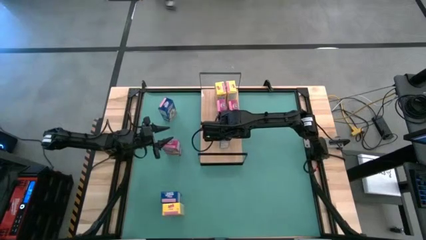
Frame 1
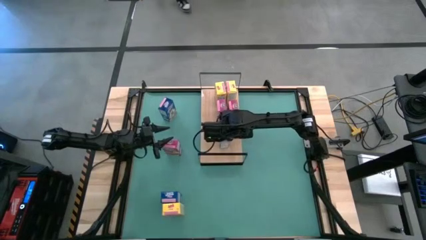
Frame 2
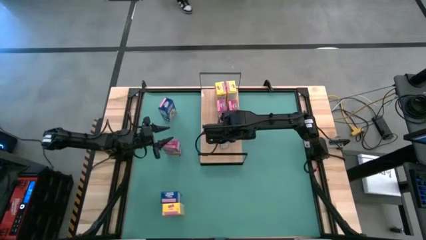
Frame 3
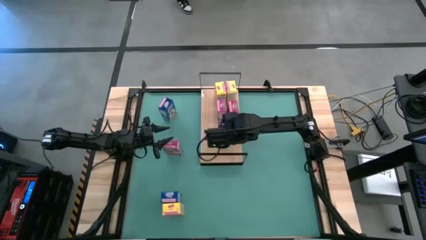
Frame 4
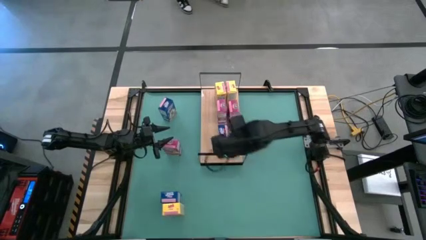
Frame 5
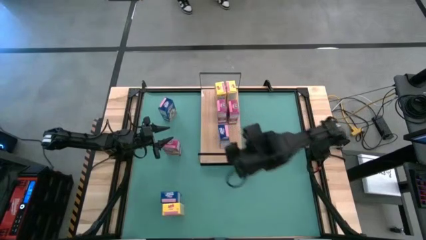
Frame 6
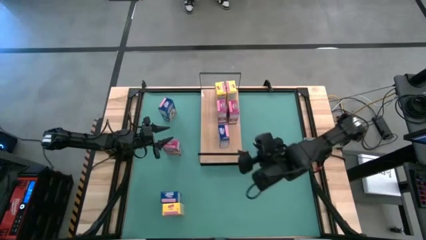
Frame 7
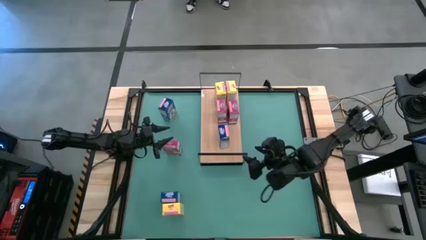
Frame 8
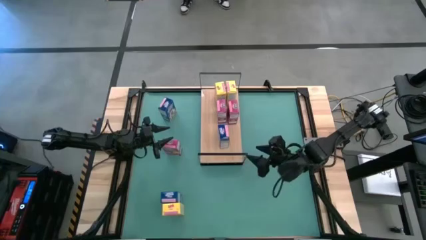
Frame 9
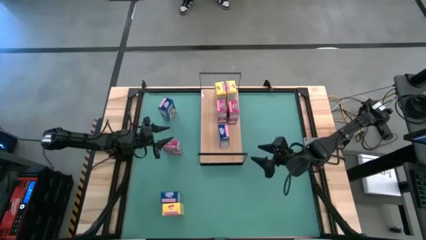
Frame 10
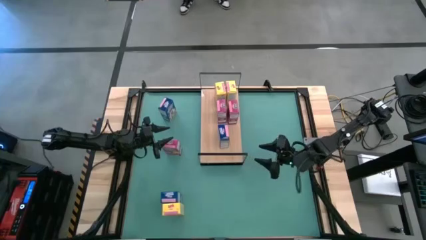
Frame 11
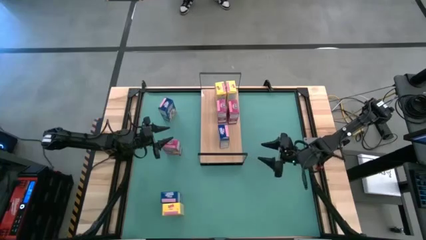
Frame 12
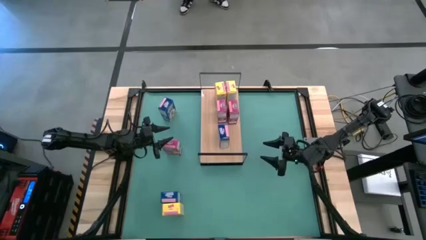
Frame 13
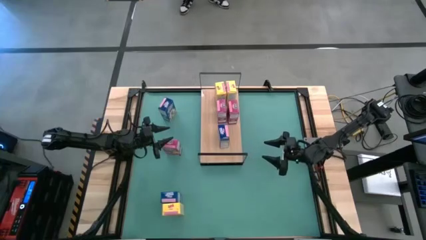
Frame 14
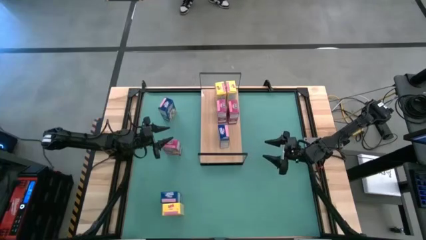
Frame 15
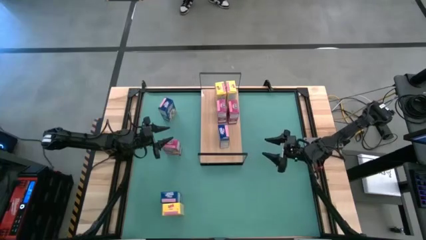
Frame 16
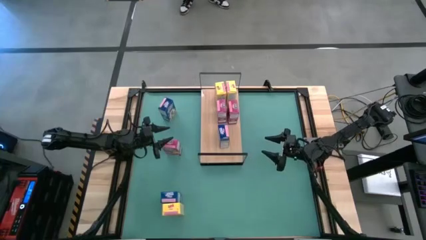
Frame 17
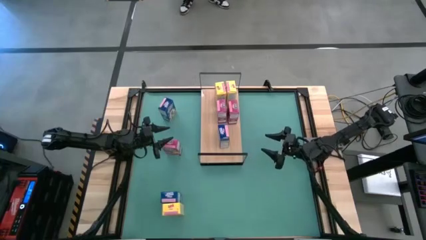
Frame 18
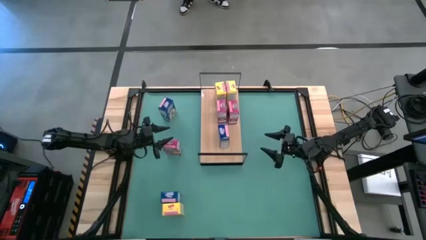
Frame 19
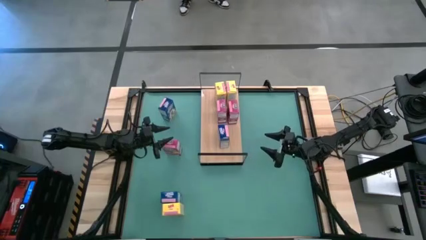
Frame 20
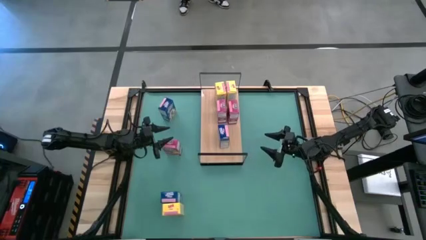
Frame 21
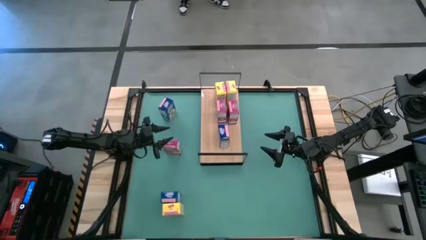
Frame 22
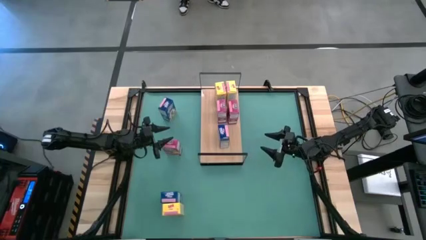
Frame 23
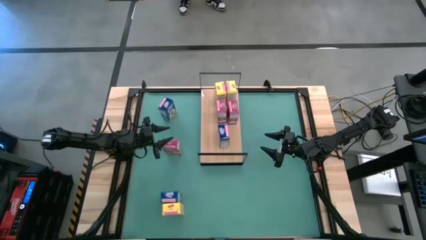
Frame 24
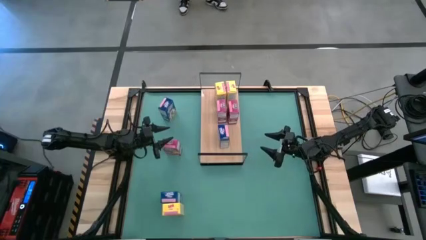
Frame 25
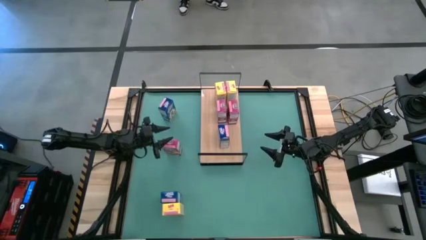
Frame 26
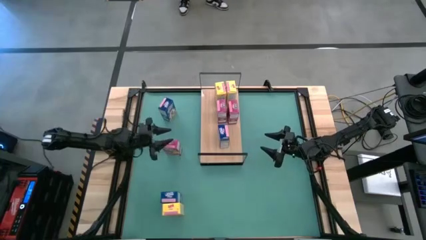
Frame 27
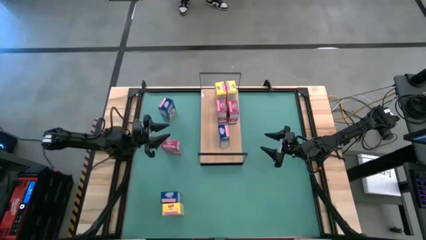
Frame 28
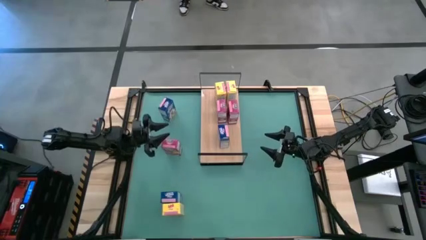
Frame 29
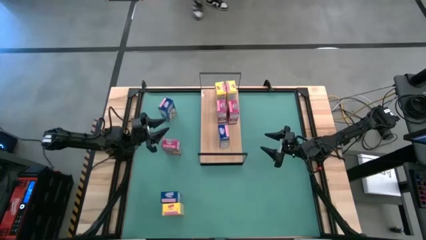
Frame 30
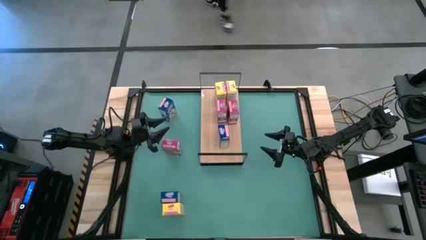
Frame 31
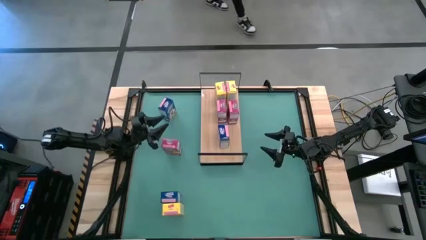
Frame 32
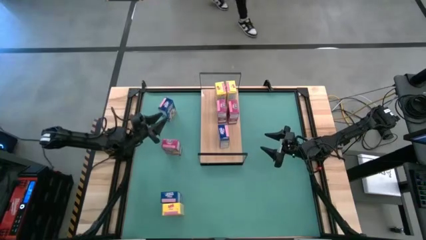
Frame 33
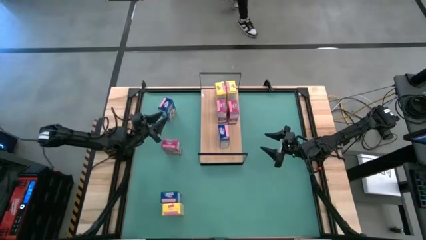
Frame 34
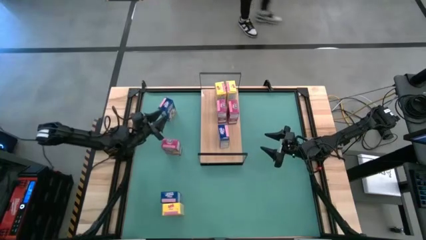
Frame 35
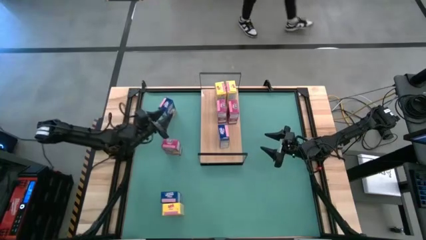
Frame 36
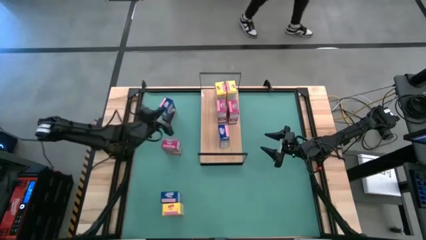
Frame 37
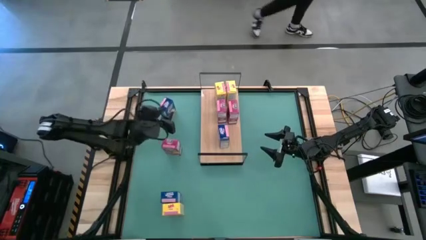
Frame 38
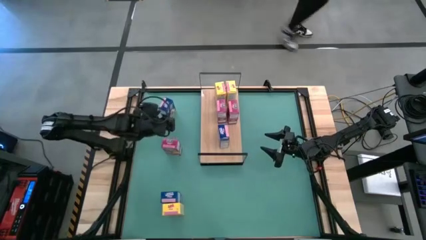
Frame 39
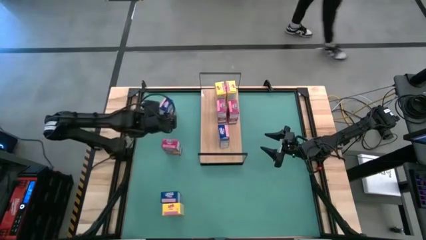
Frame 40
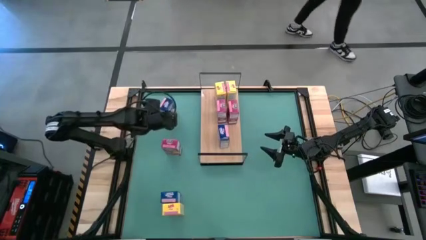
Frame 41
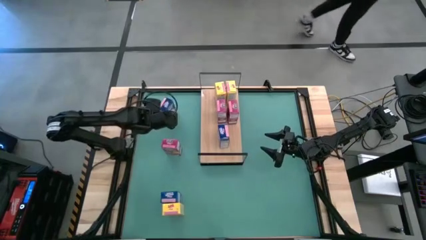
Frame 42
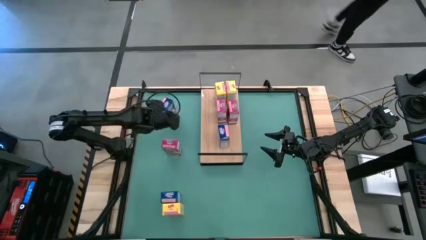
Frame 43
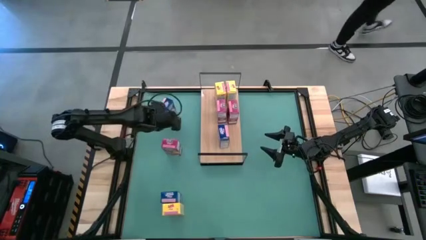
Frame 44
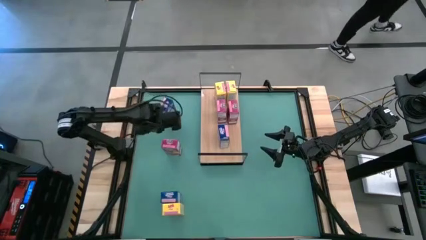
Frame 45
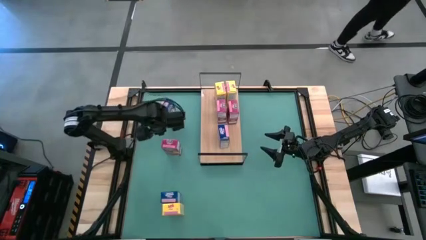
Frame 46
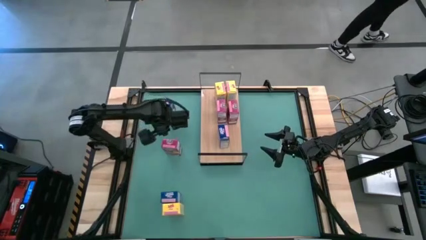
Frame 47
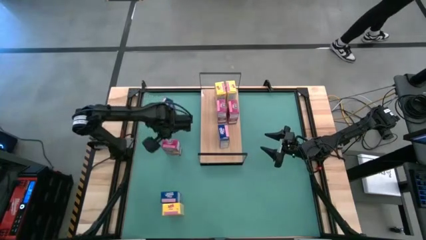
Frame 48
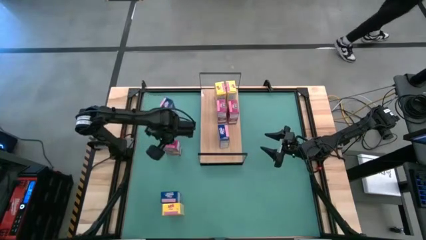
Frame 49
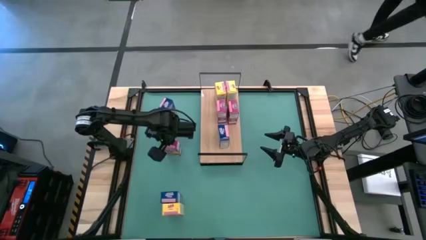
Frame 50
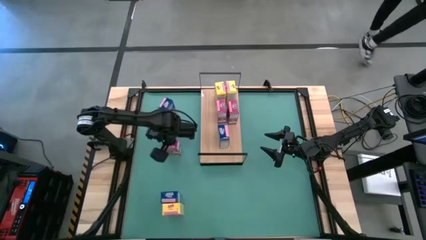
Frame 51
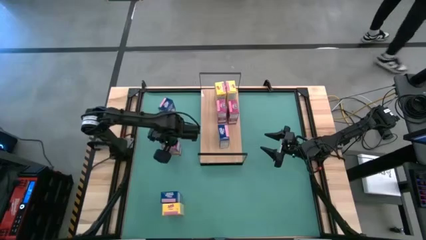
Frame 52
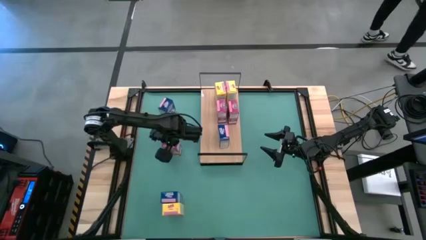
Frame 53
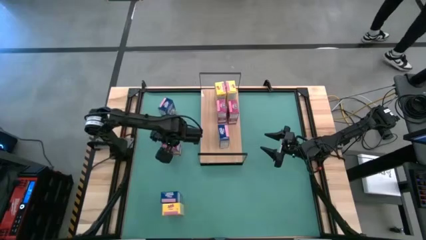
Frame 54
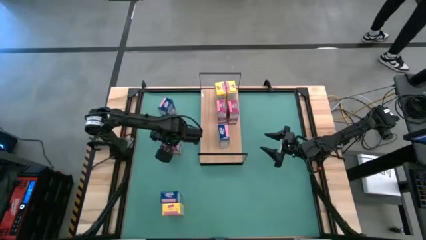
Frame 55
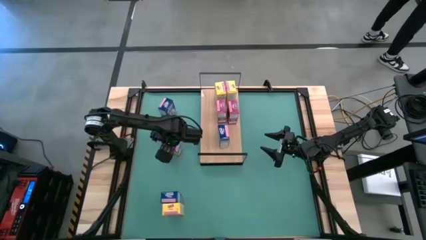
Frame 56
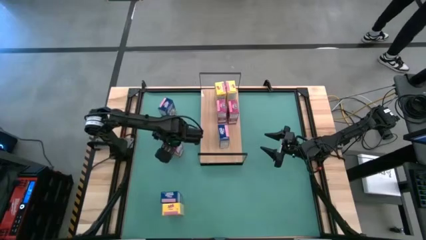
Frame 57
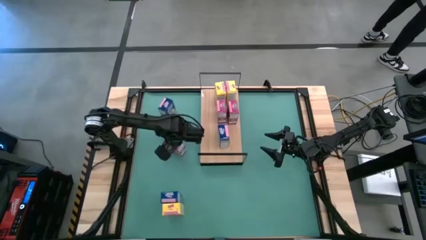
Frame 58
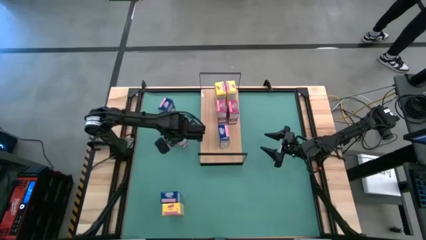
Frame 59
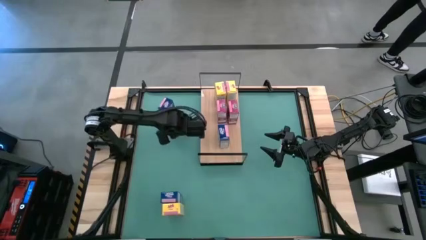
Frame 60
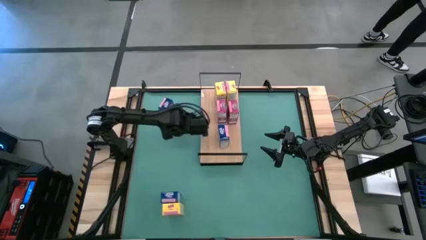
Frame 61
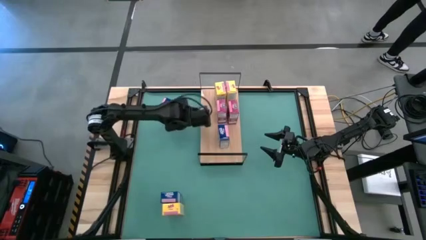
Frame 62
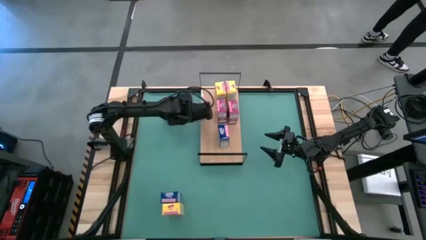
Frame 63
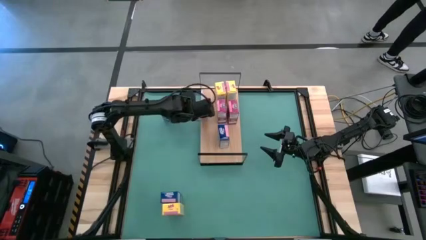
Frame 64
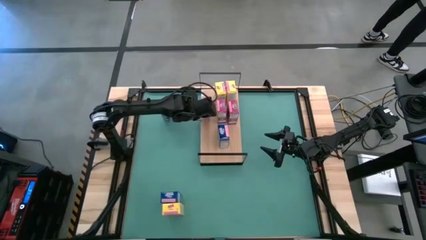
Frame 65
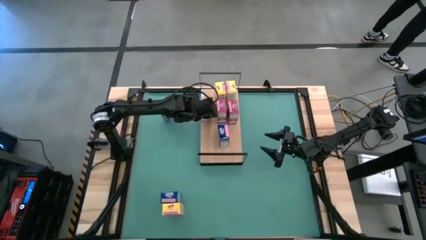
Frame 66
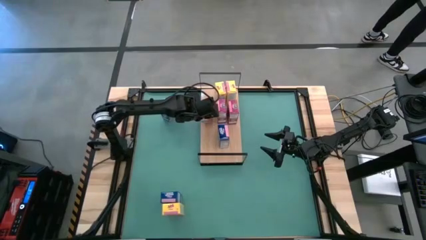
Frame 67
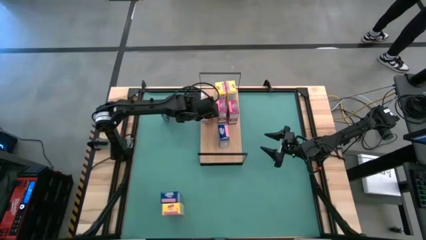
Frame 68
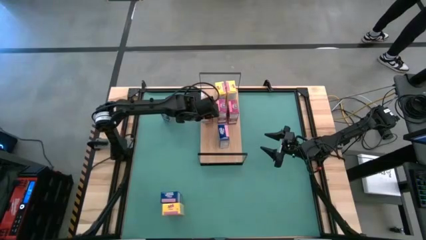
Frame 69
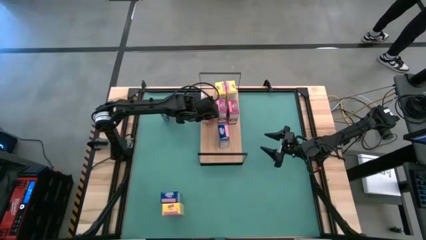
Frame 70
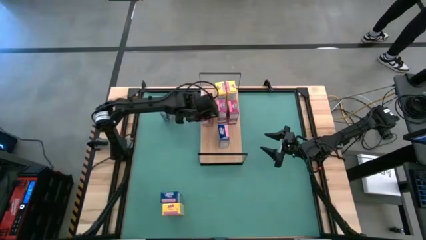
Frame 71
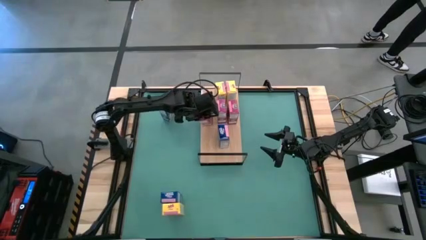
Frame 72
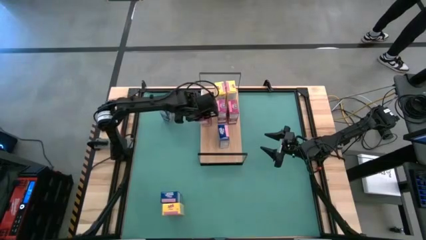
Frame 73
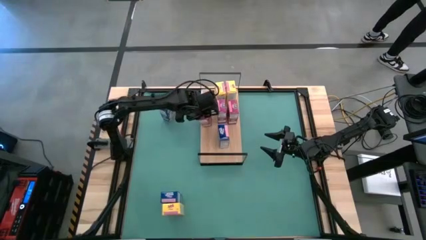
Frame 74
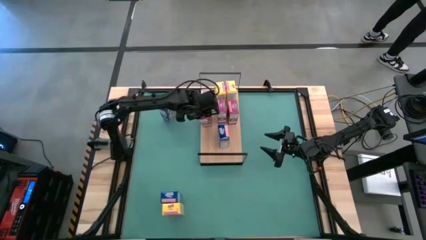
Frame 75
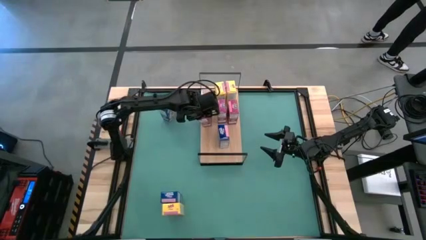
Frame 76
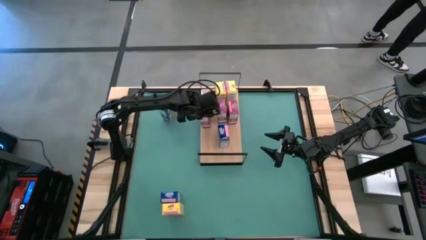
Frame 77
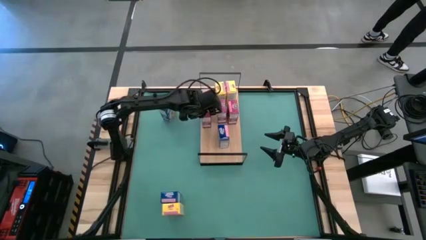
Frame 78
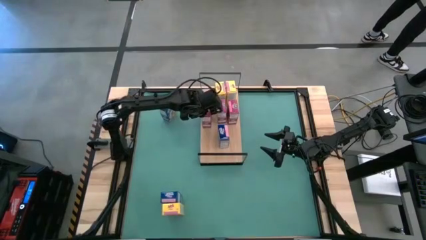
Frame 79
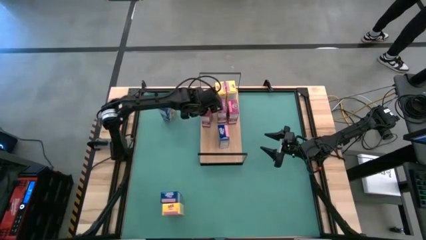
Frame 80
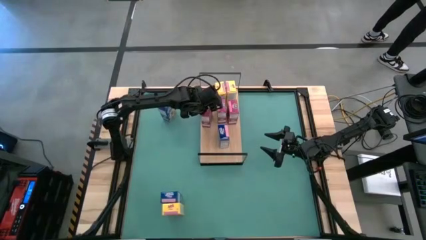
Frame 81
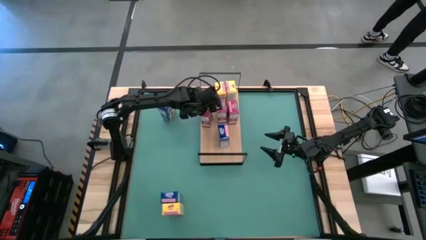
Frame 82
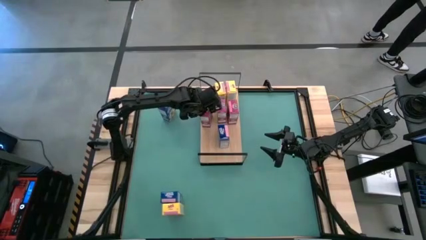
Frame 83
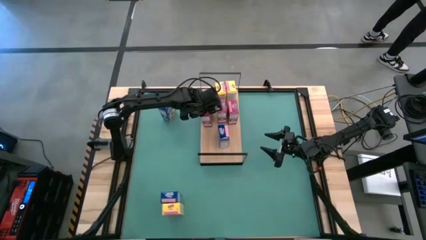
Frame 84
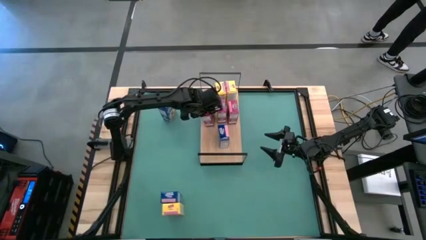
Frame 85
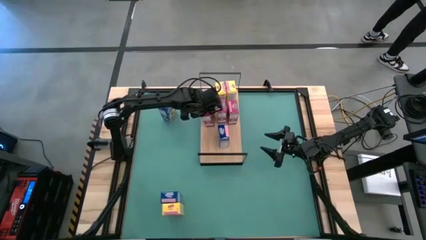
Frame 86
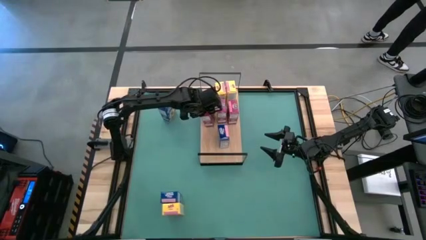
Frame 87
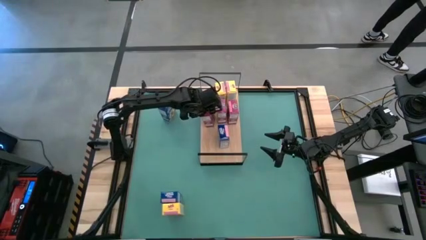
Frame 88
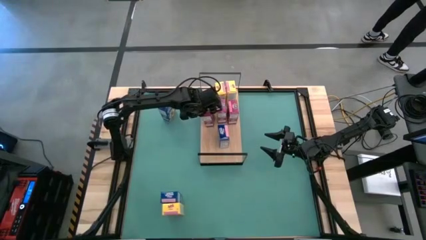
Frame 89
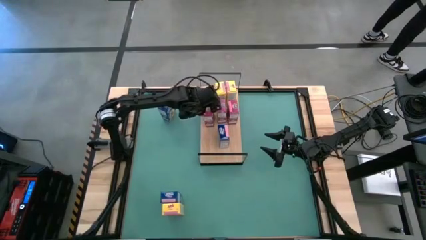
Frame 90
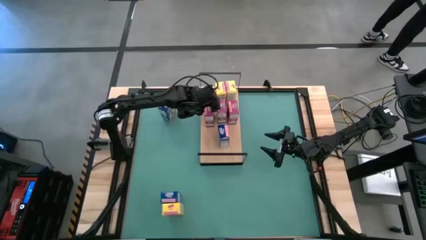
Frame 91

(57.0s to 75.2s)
Task: Stack cereal on shelf
Put the purple cereal box on the shelf aligned with the other purple cereal boxes
